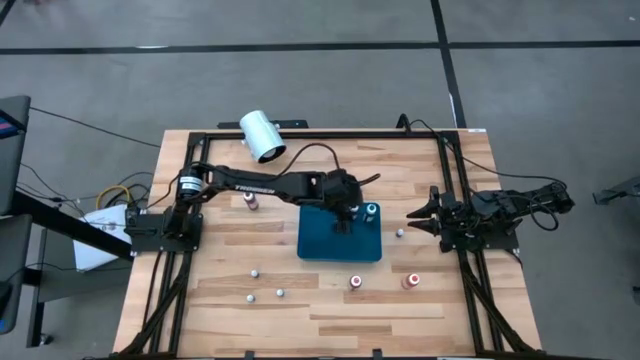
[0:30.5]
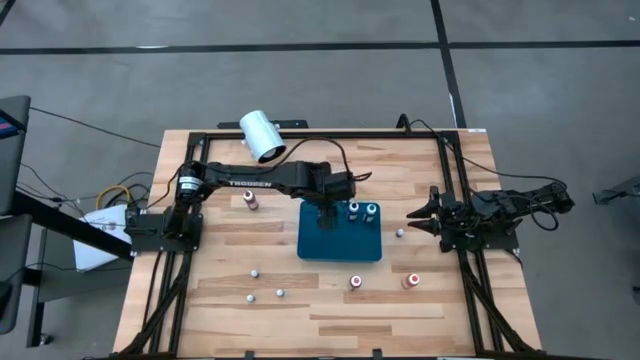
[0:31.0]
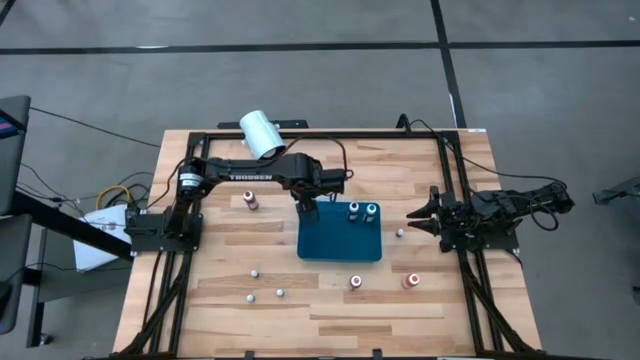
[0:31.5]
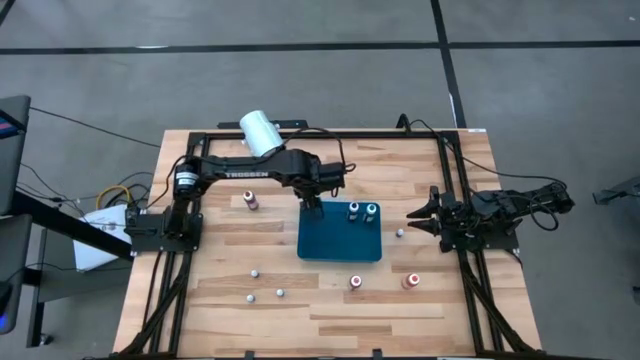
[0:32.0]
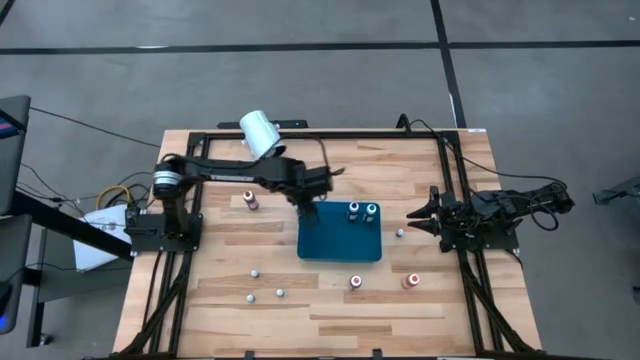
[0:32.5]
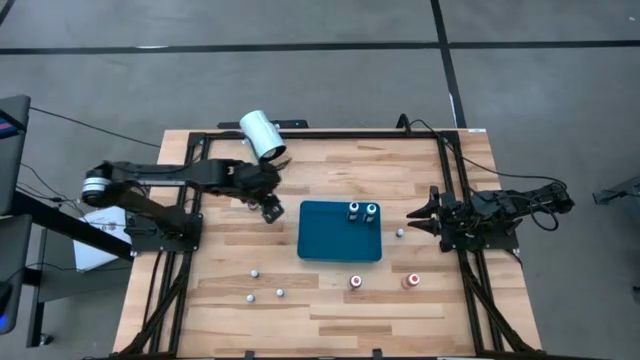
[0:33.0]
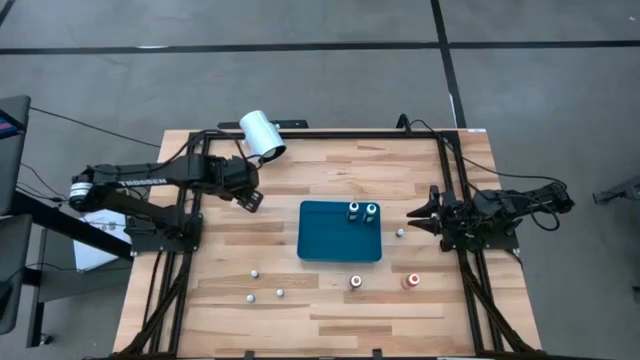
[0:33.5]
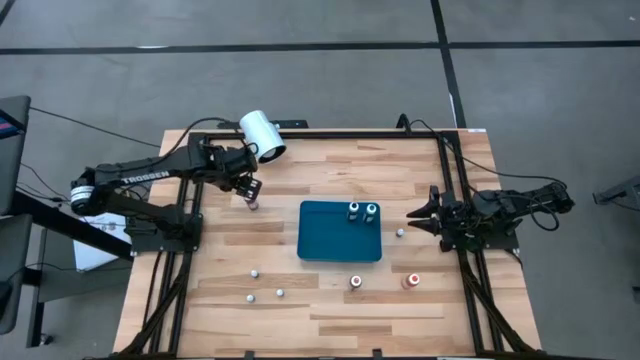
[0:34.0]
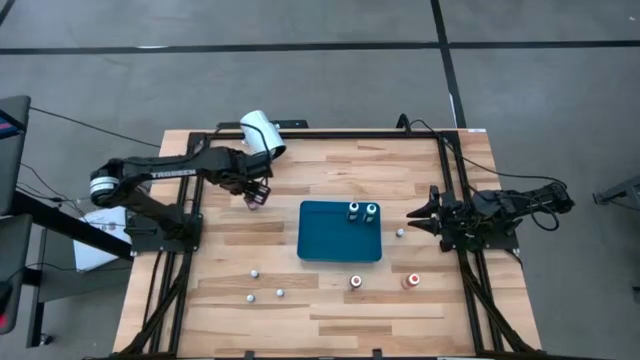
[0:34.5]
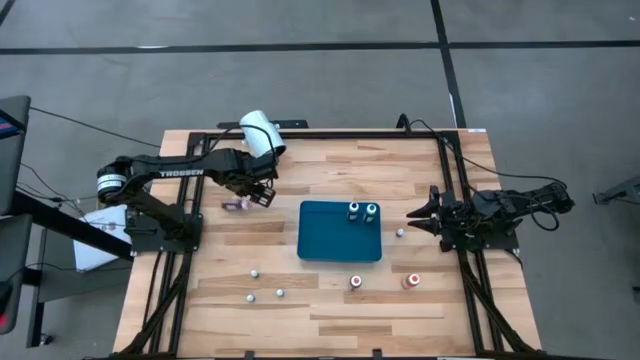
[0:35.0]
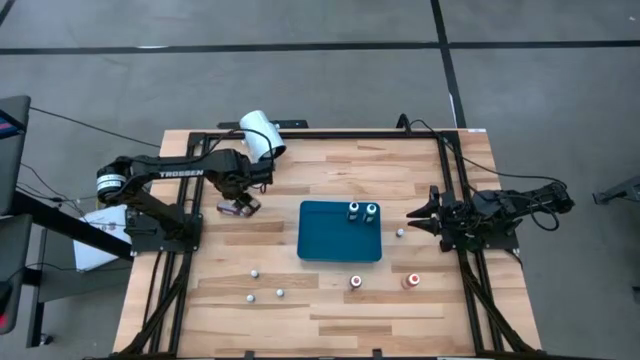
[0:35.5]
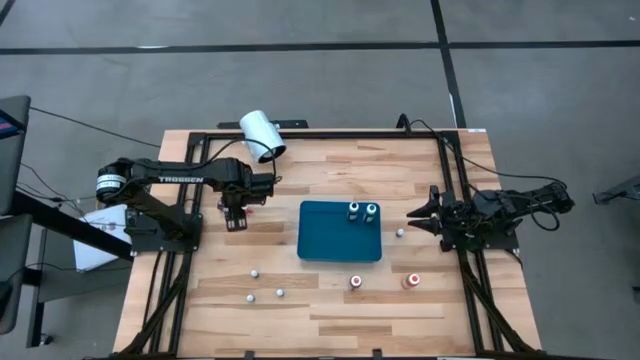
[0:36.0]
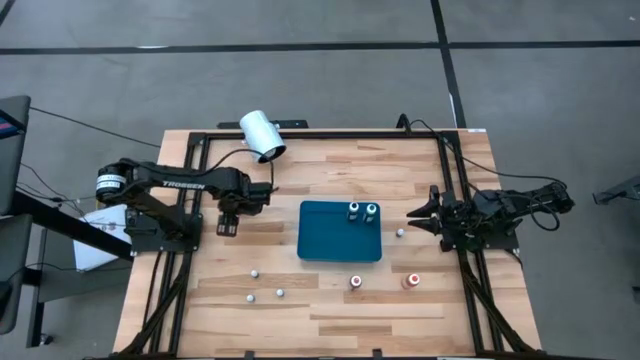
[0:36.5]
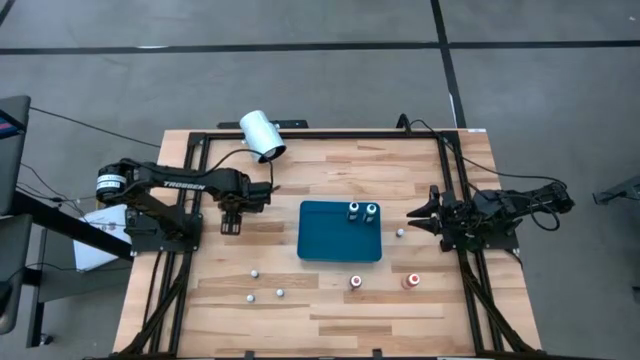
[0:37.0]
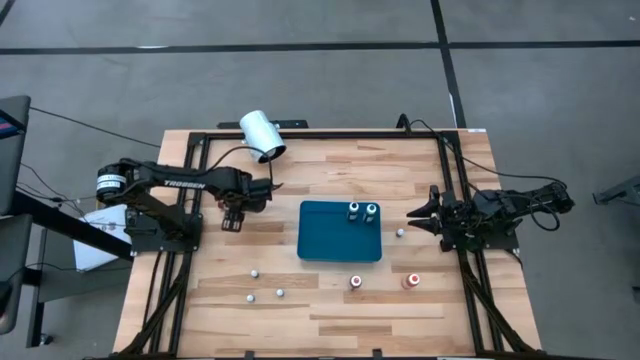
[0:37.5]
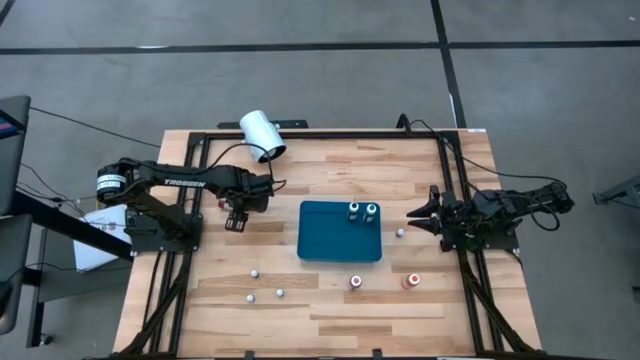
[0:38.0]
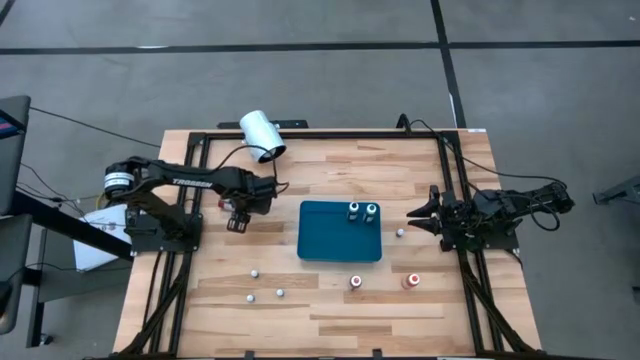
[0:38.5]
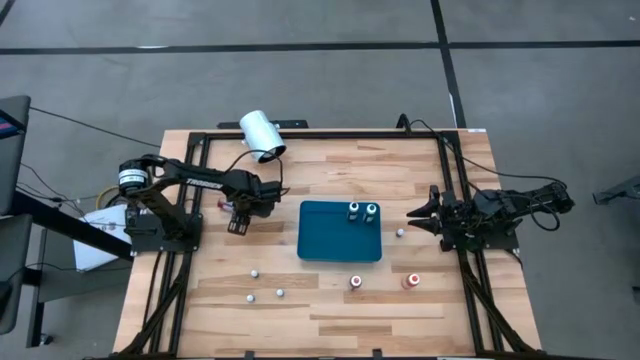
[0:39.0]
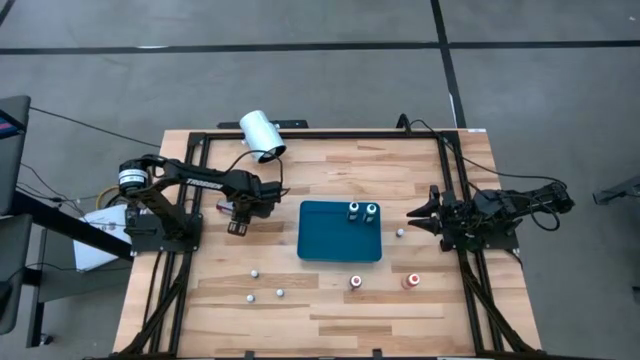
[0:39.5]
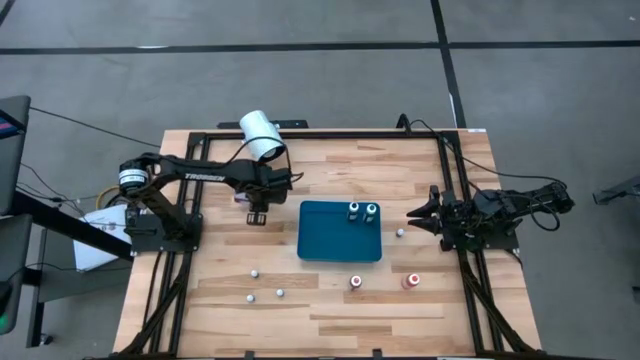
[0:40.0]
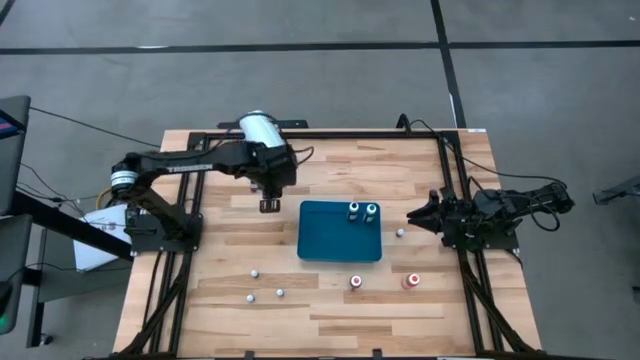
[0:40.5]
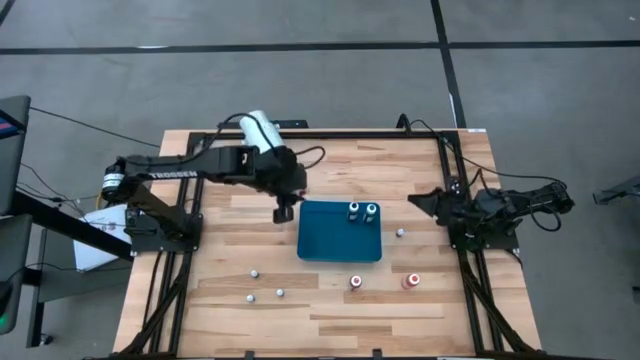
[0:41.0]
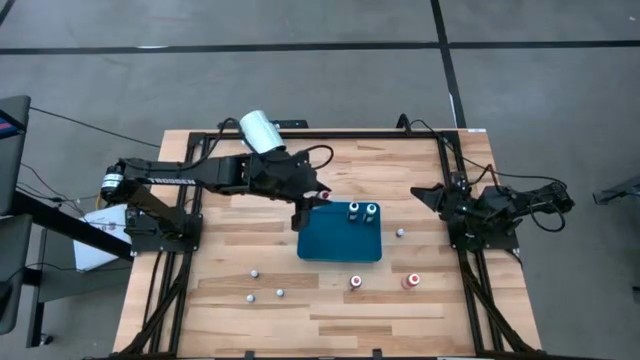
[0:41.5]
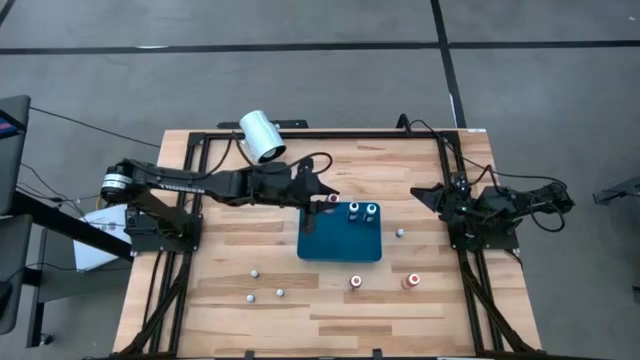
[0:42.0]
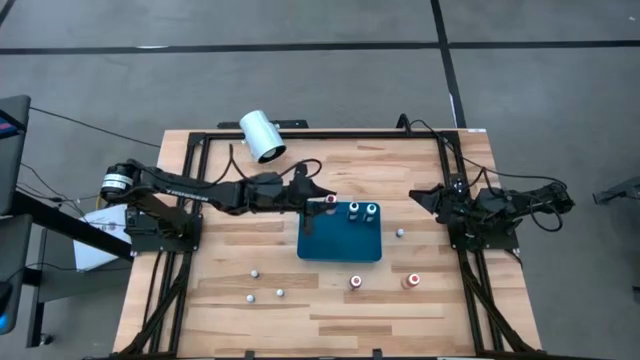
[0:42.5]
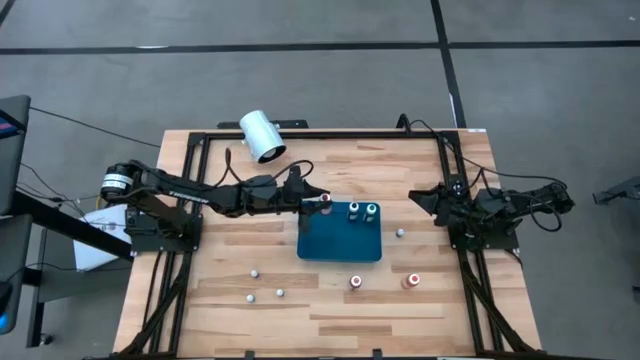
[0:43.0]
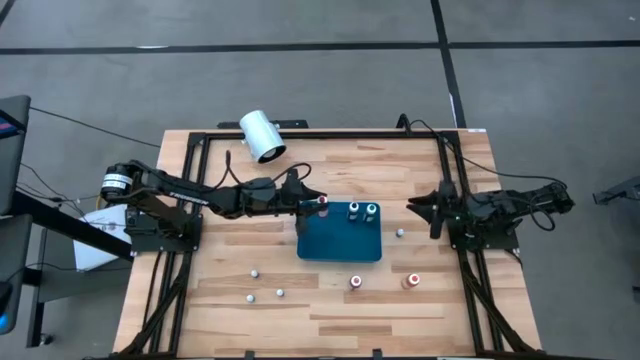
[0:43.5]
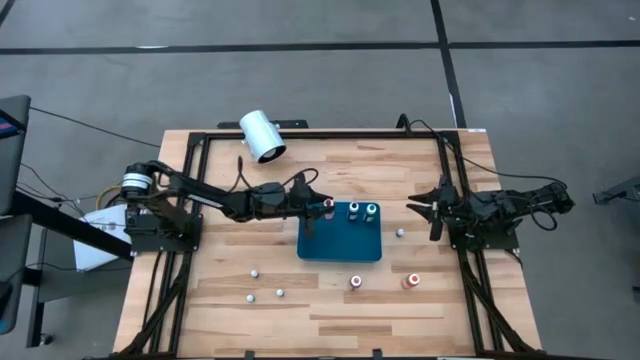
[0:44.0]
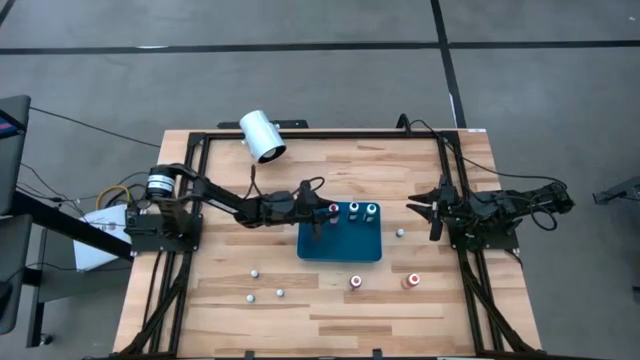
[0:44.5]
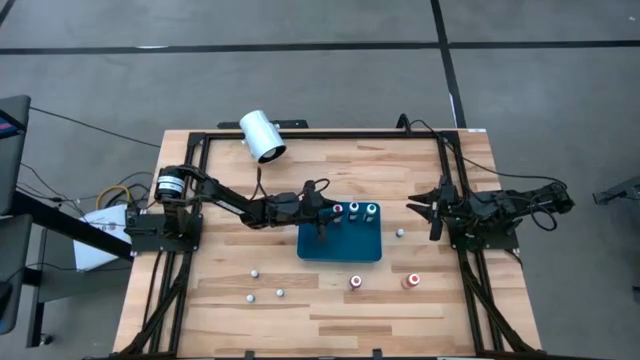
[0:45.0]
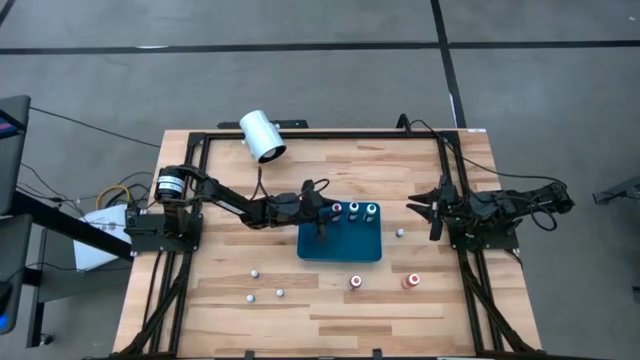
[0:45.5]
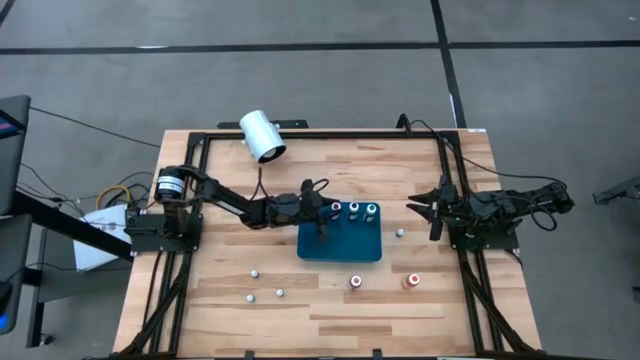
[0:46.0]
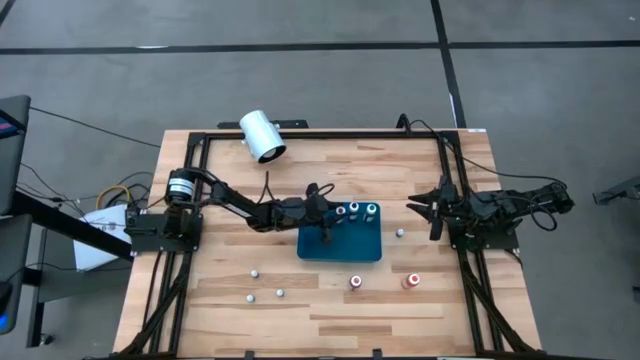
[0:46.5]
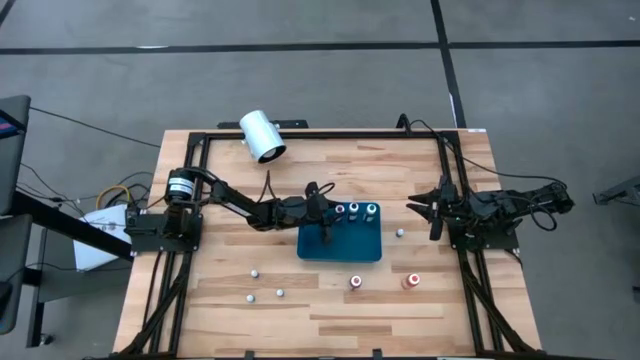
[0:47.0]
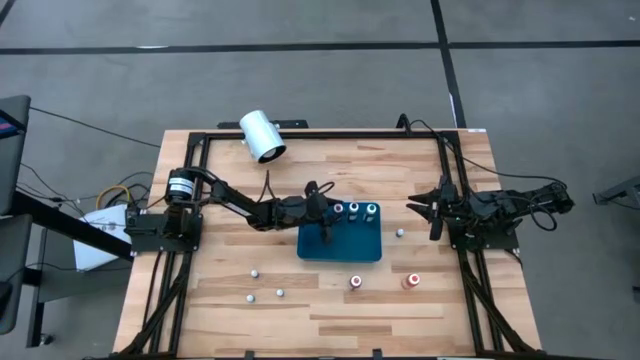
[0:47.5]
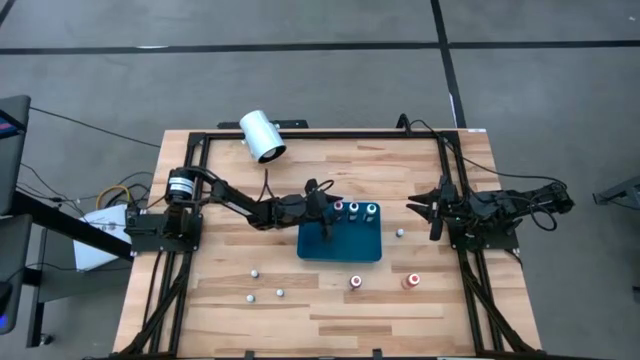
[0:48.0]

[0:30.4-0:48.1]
Task: Pick & Place food coloring
Put the large red food coloring bottle into the blue bin

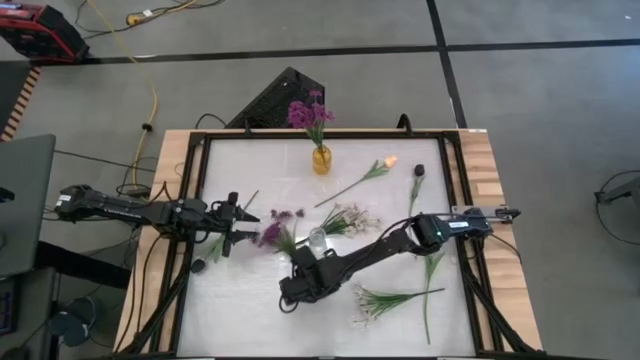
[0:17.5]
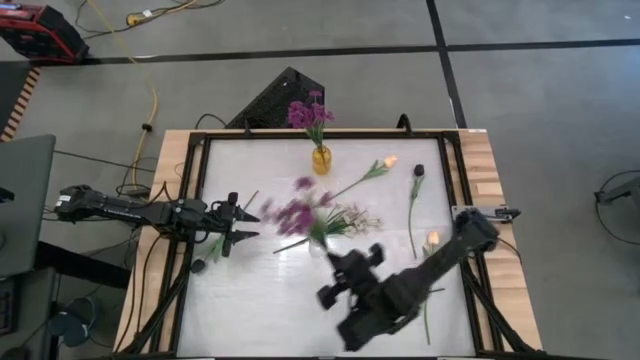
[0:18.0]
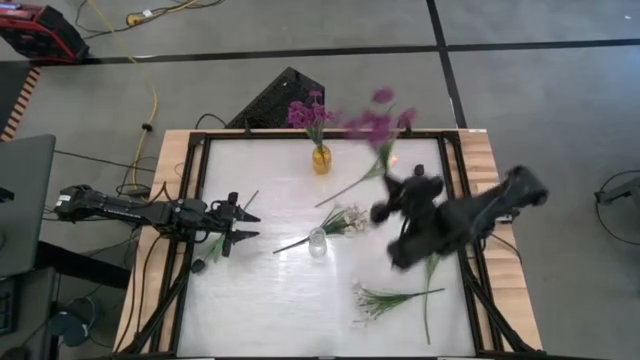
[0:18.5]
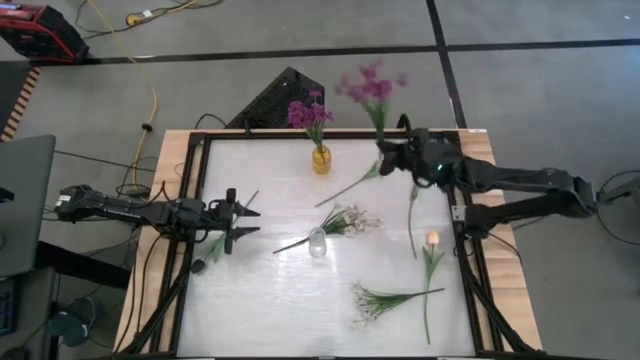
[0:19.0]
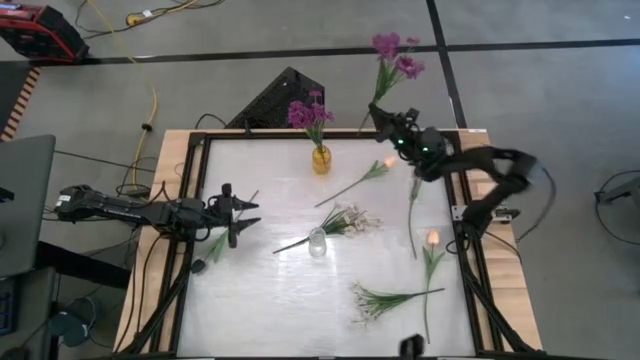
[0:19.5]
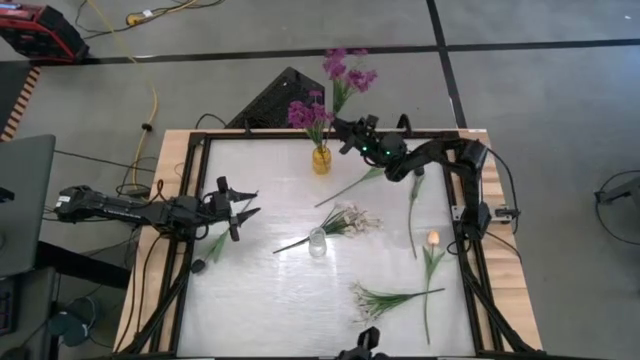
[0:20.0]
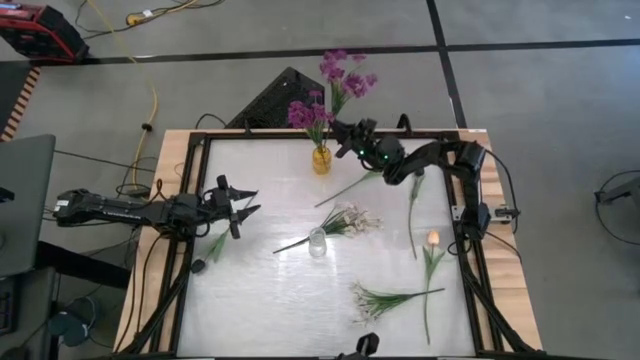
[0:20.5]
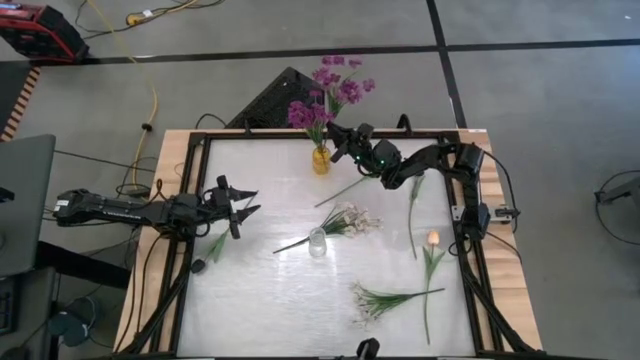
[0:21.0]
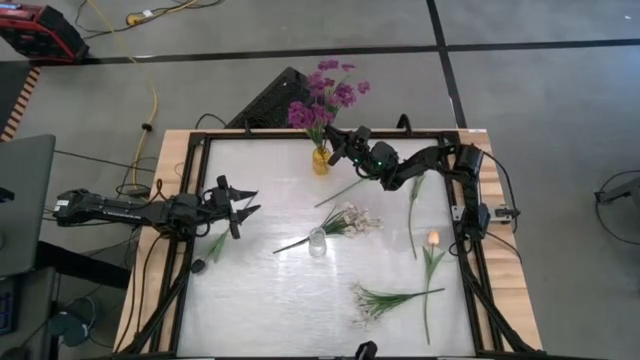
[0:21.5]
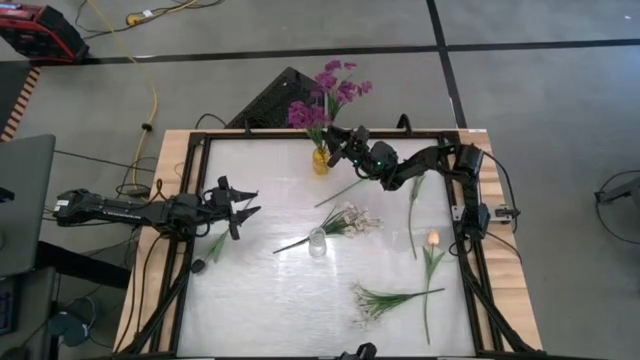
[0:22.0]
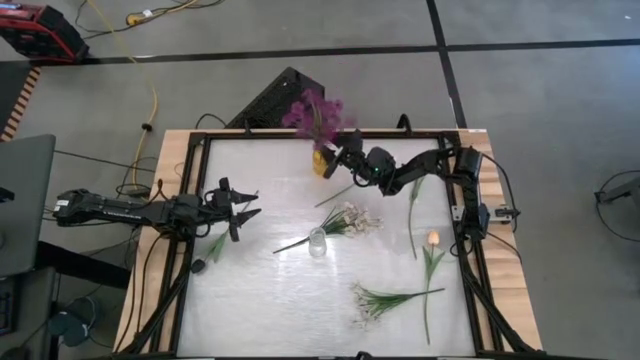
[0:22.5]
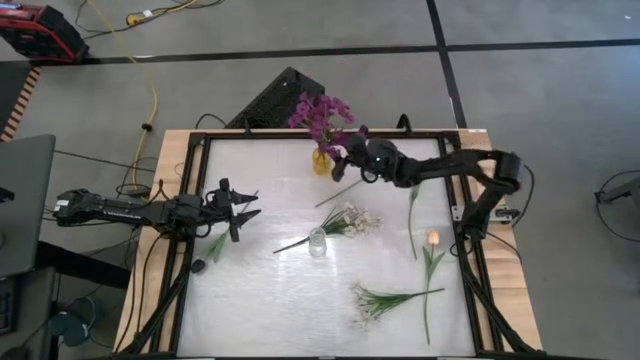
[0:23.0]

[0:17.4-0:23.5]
Task: Sort flowers into vase by color
Put the purple flowers into the yellow vase
